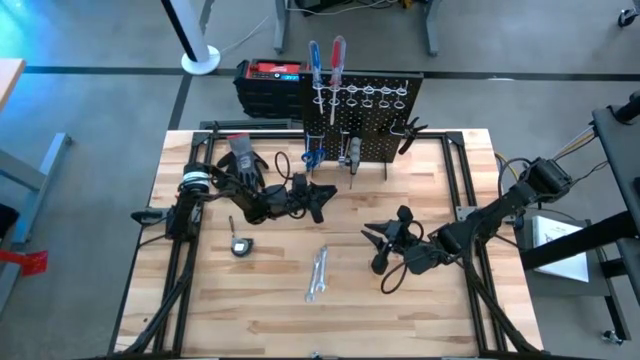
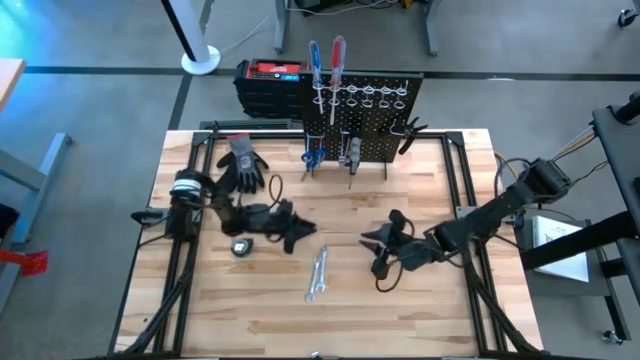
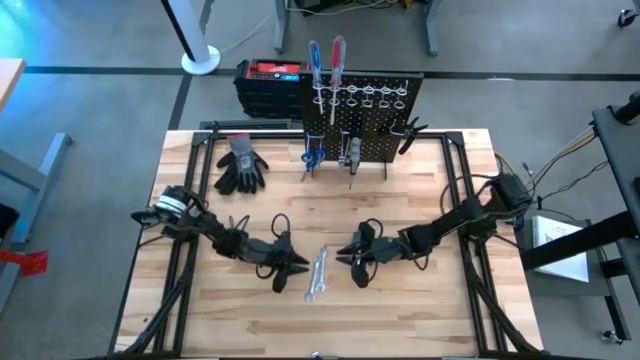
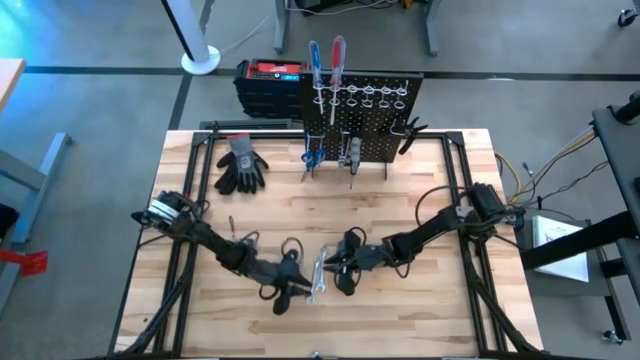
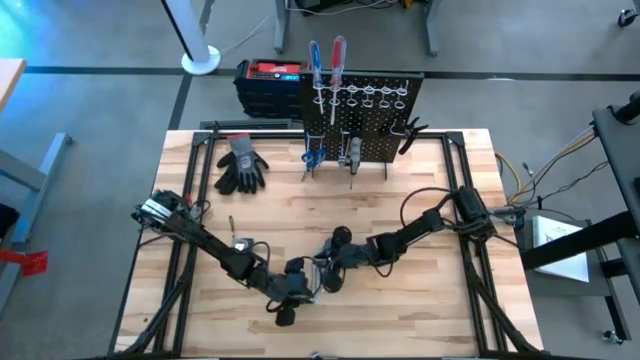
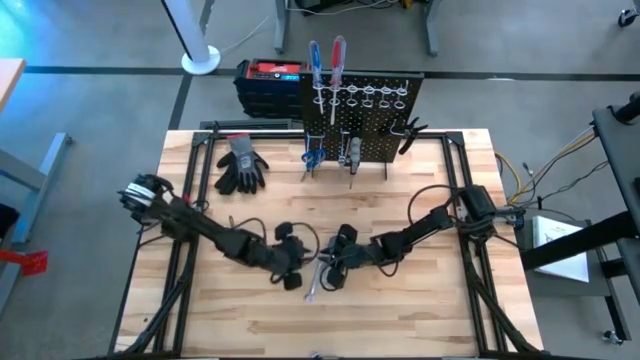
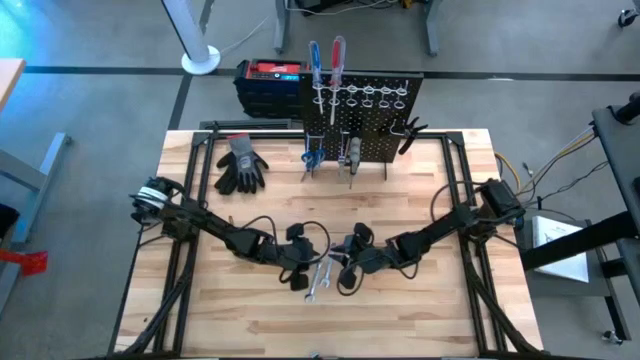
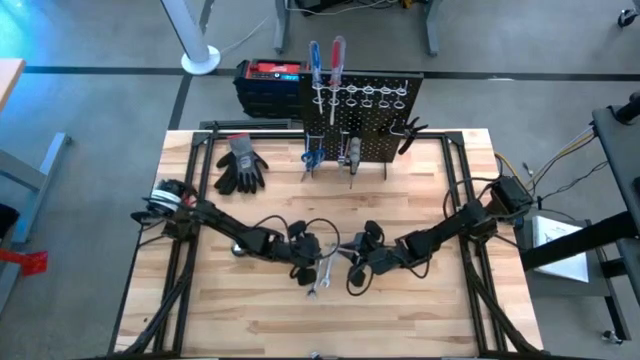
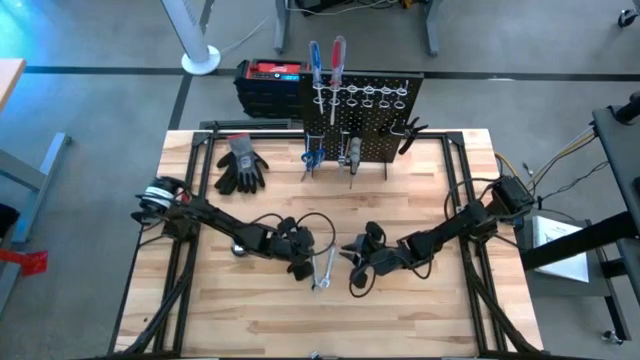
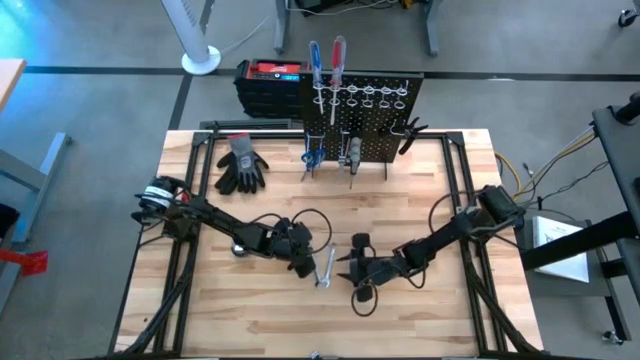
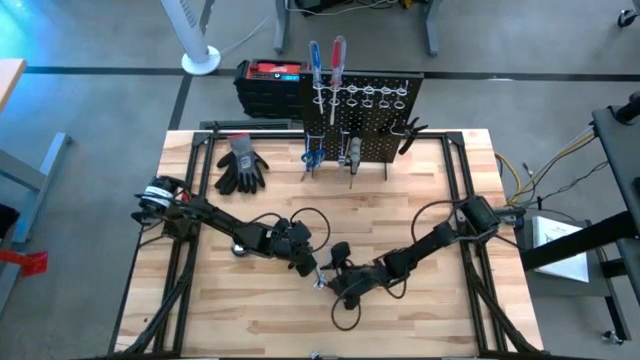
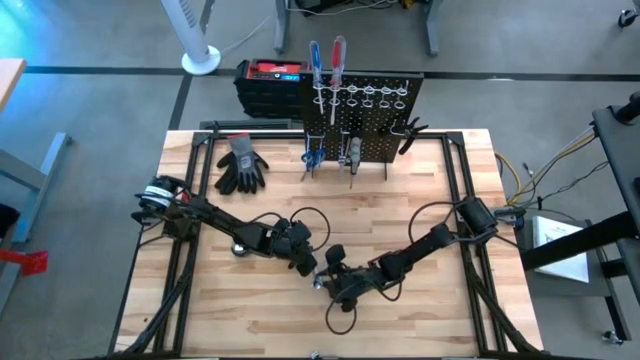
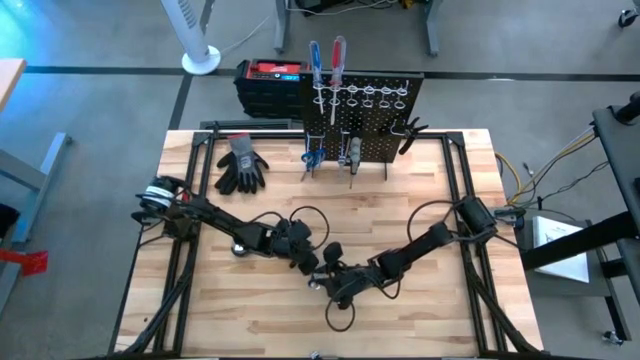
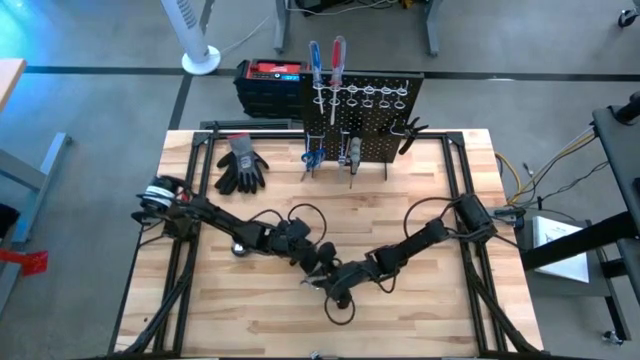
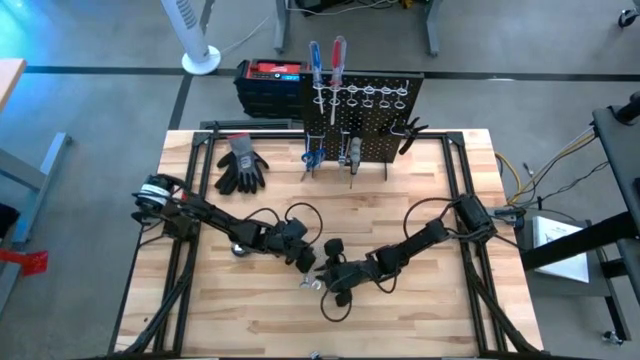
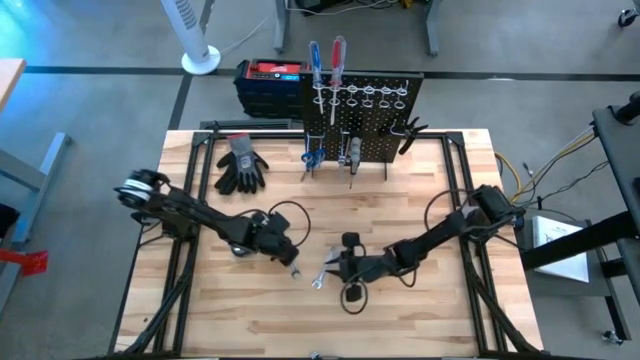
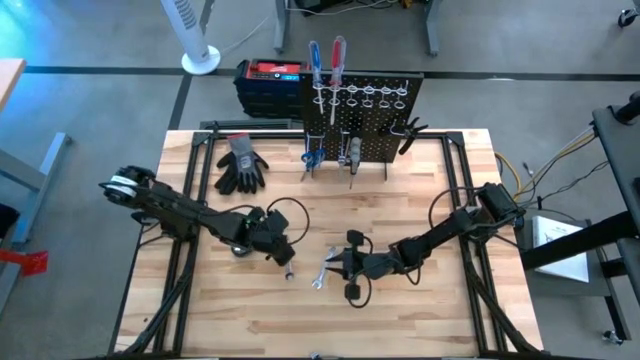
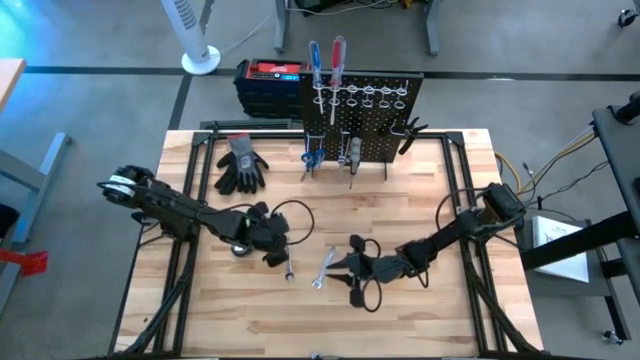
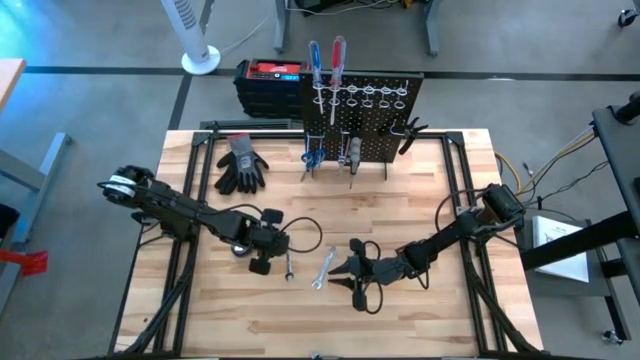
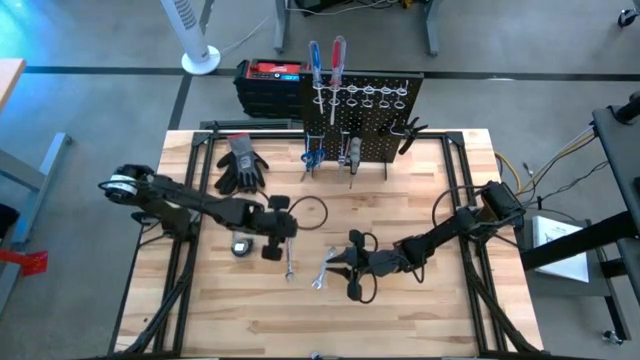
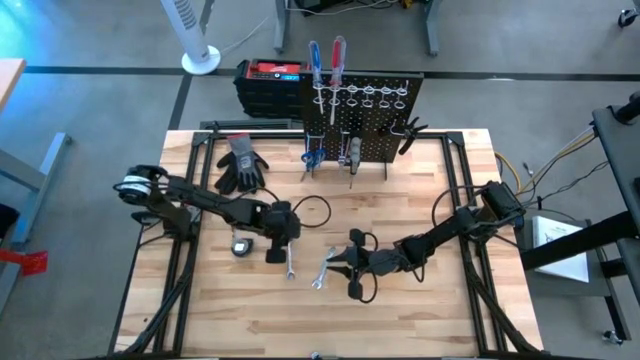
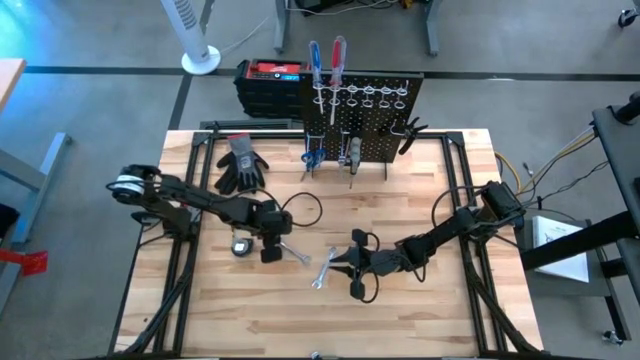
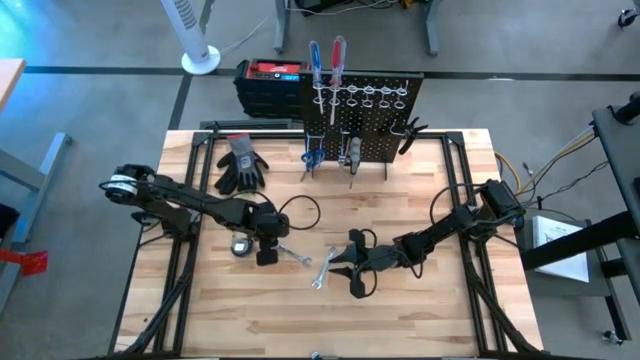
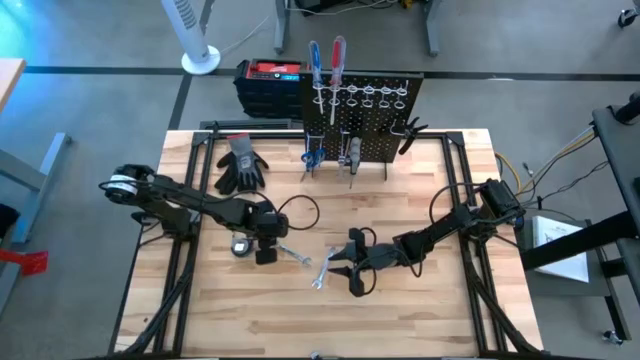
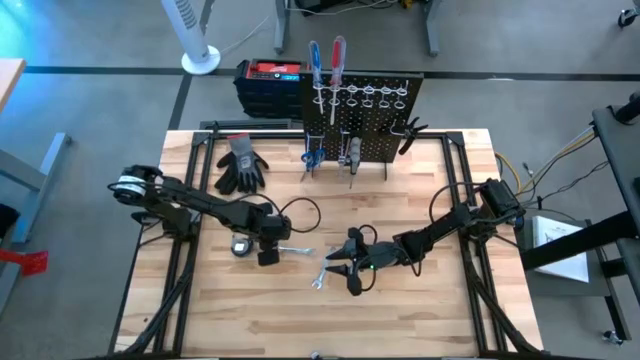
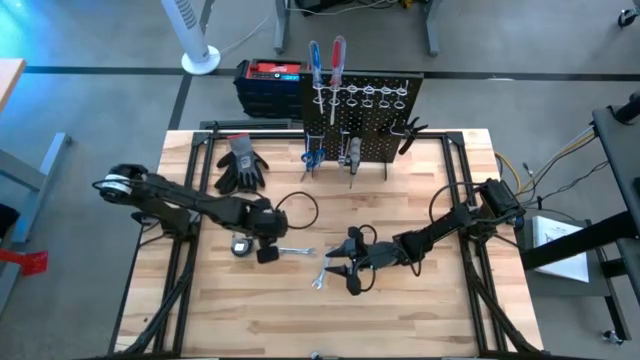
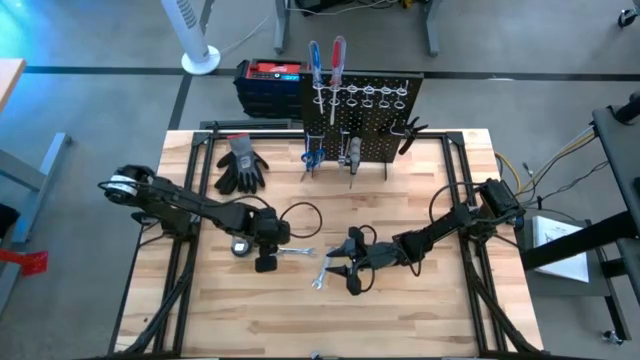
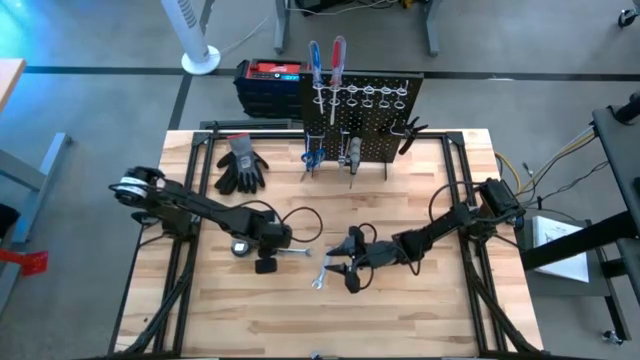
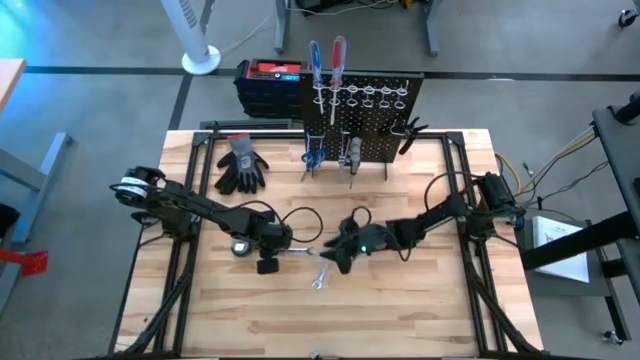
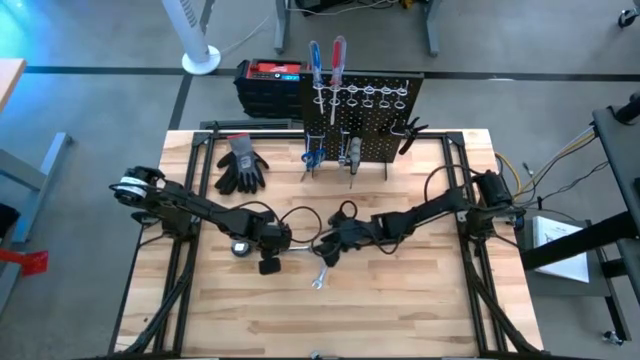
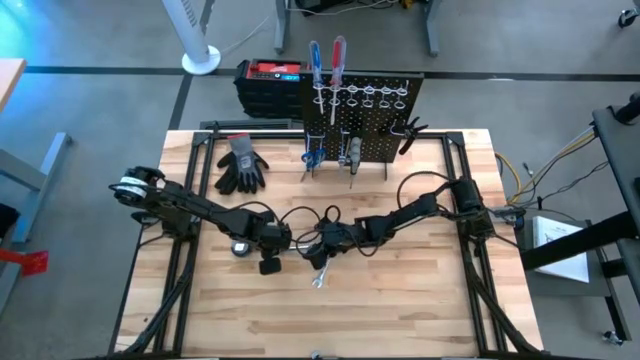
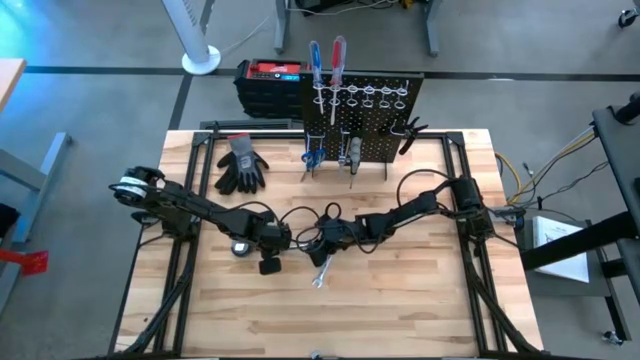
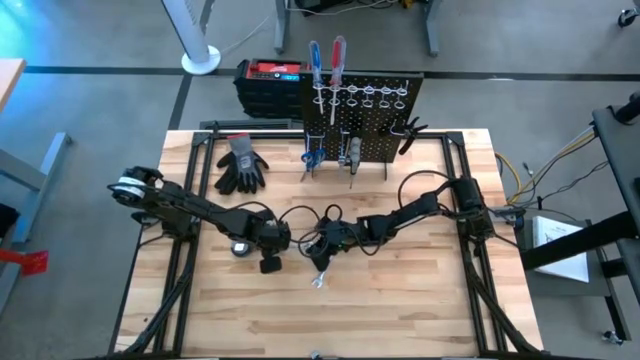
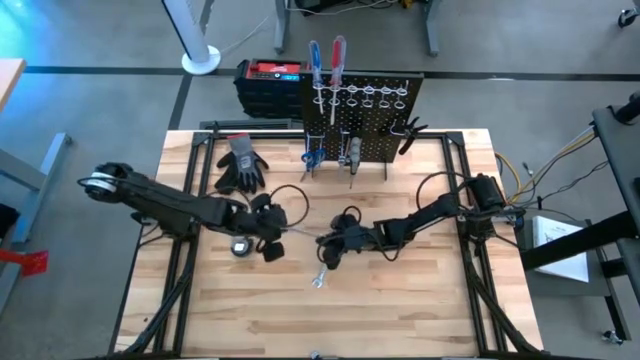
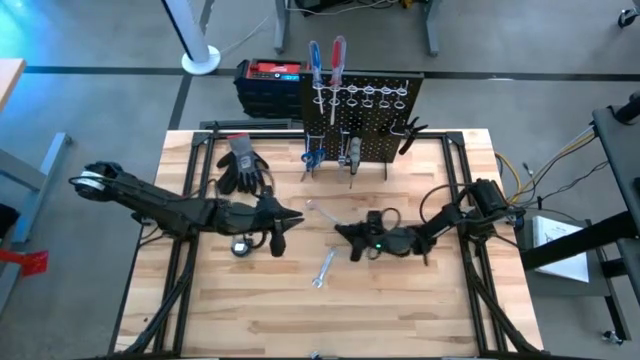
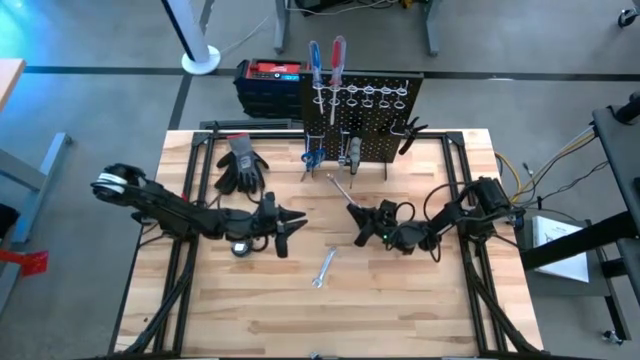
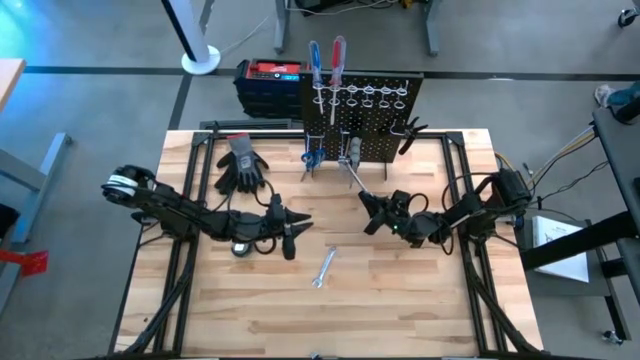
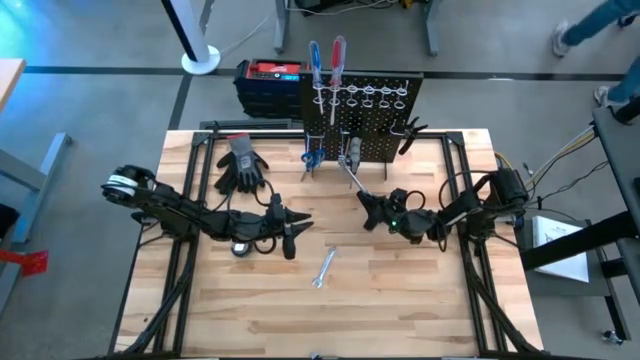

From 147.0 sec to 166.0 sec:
Task: Hang tools onto peg board
Hang the right silver wrench on the peg board

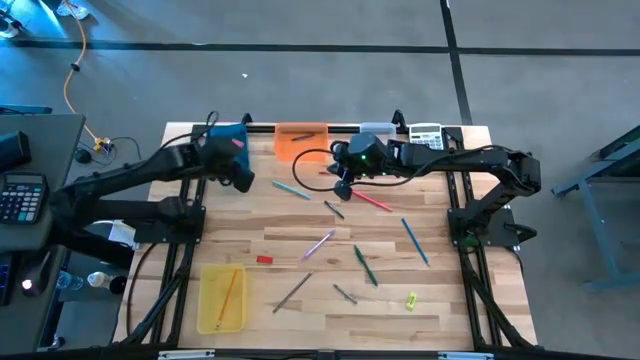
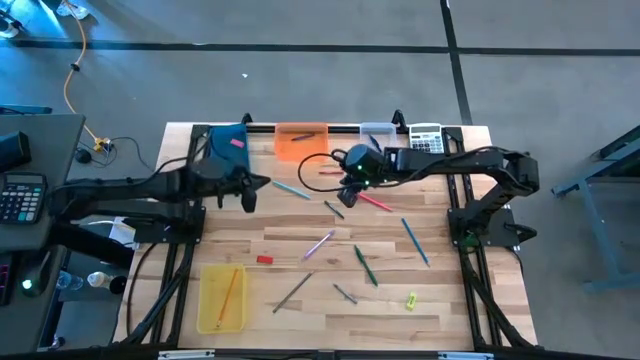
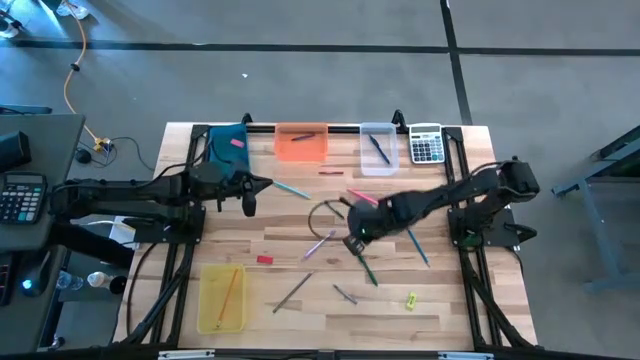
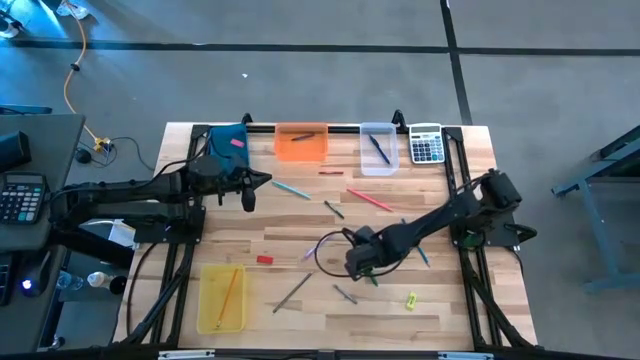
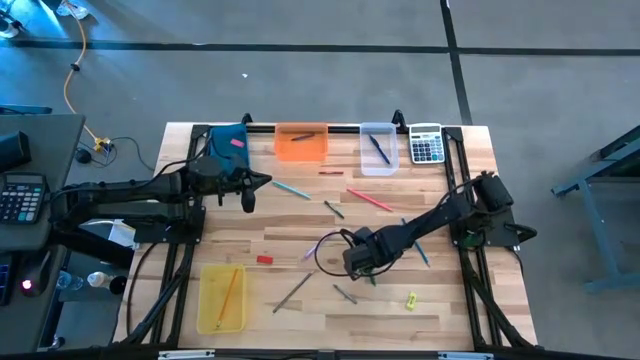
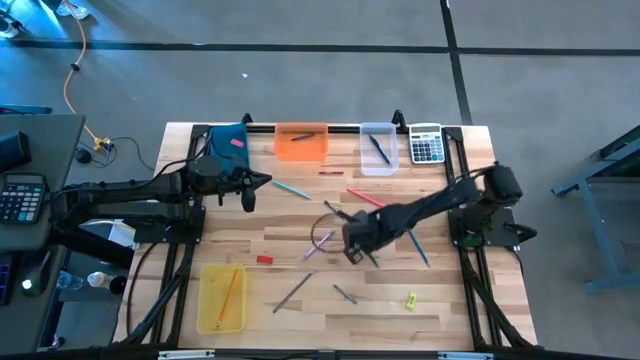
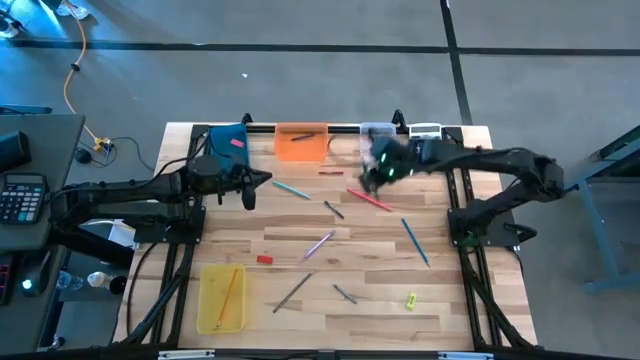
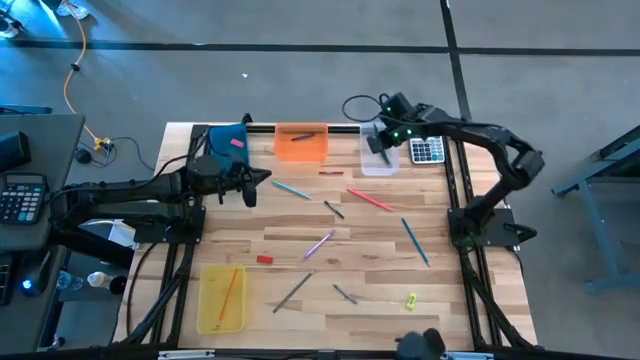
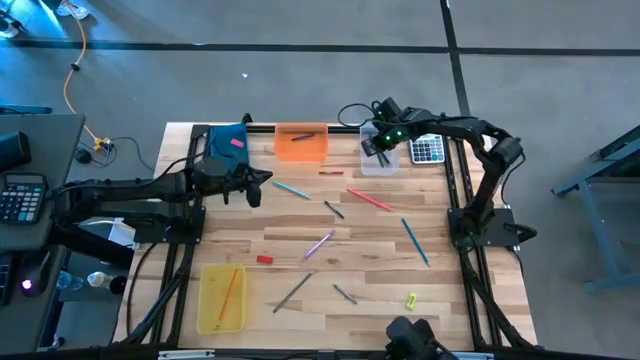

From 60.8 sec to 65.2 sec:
Task: Sort crayons/erasers/pens/pencils in bins
Put the green pen into the transparent bin
